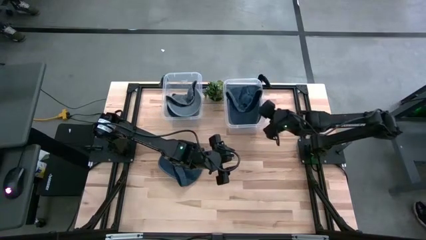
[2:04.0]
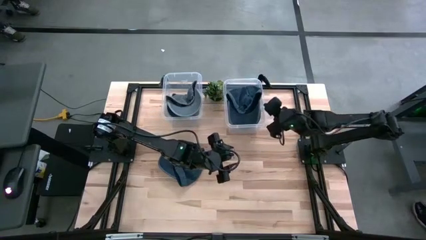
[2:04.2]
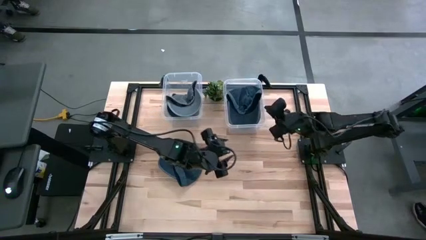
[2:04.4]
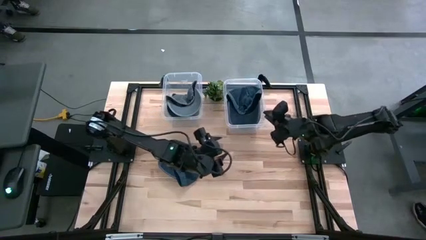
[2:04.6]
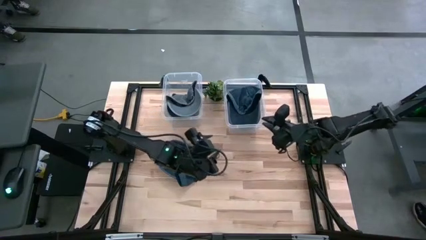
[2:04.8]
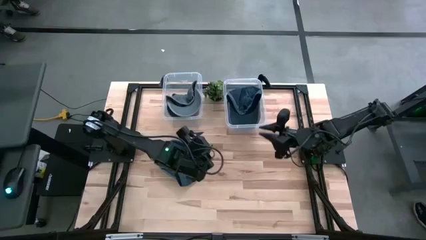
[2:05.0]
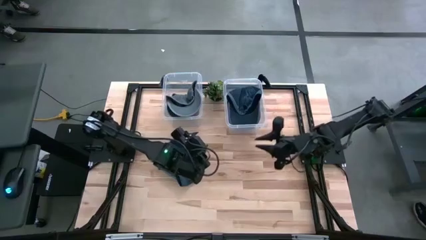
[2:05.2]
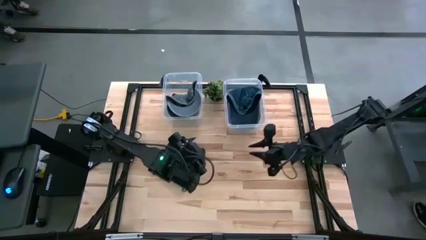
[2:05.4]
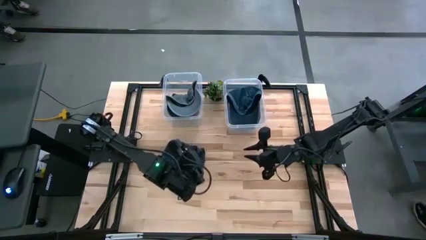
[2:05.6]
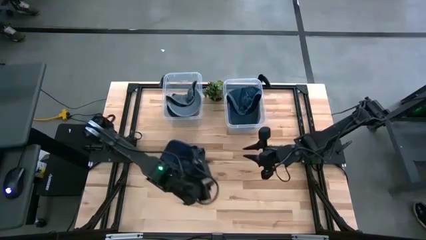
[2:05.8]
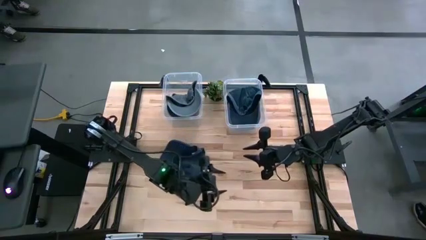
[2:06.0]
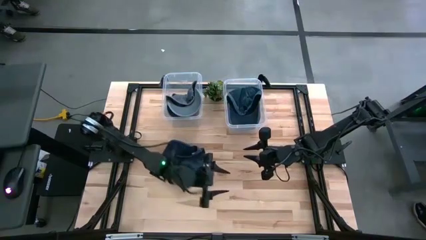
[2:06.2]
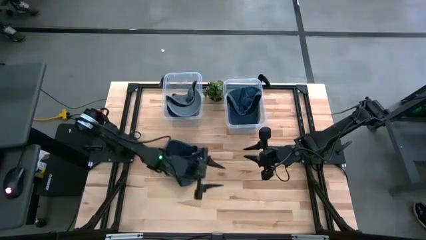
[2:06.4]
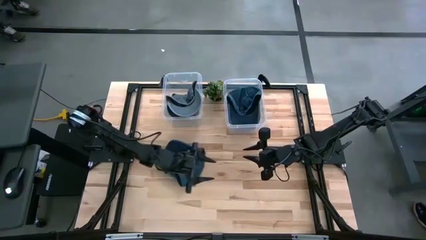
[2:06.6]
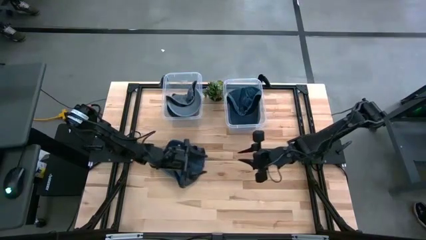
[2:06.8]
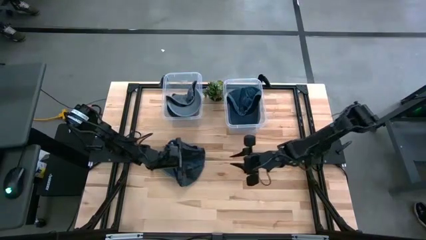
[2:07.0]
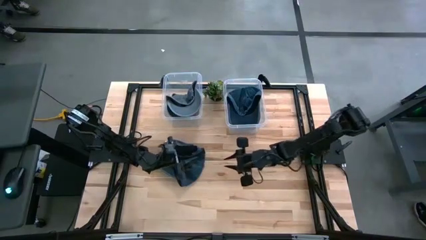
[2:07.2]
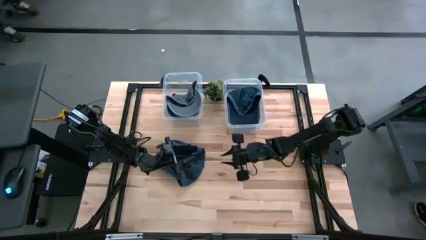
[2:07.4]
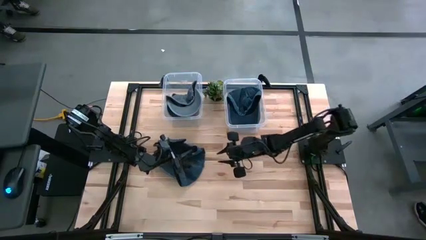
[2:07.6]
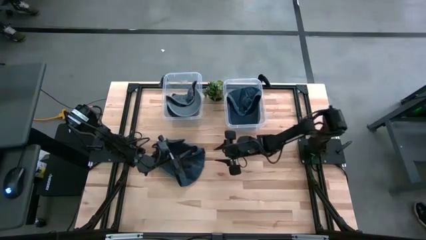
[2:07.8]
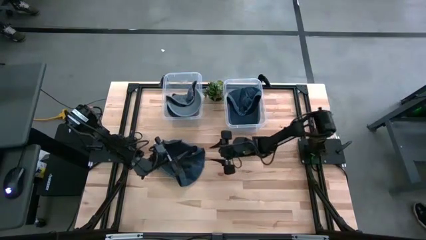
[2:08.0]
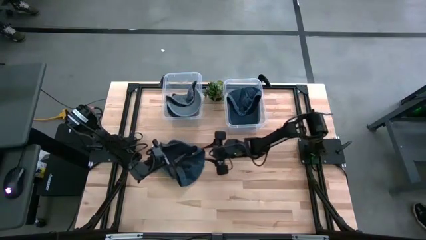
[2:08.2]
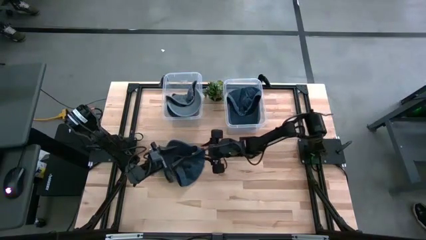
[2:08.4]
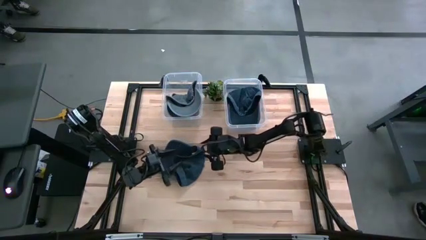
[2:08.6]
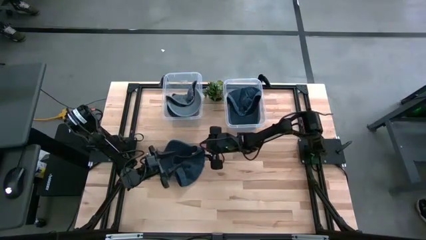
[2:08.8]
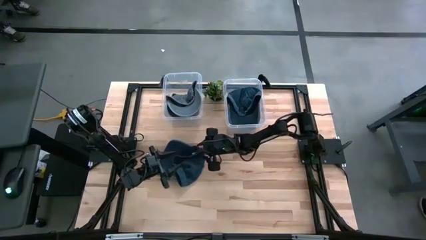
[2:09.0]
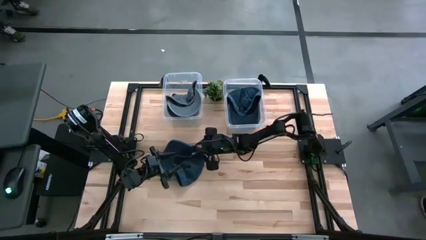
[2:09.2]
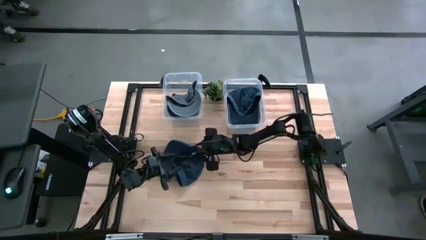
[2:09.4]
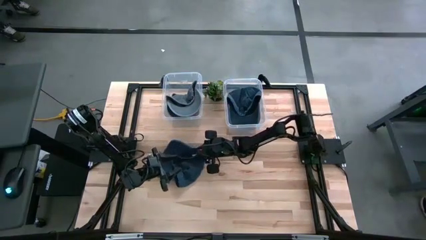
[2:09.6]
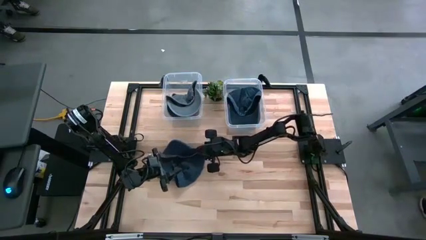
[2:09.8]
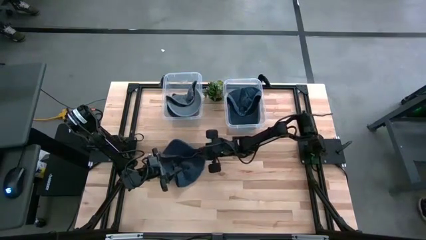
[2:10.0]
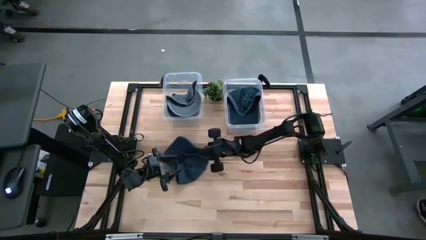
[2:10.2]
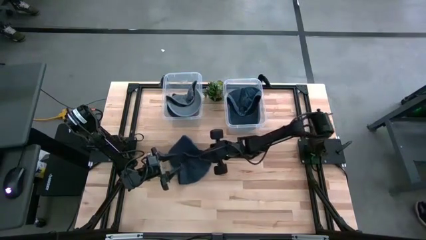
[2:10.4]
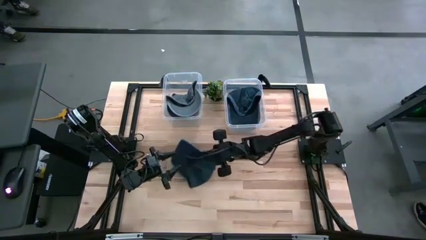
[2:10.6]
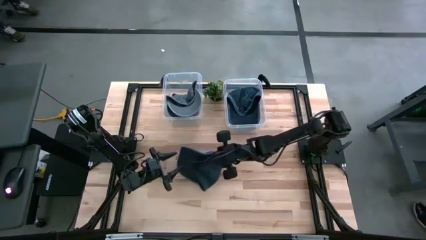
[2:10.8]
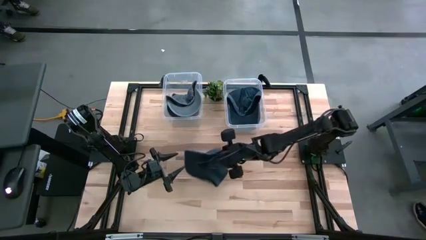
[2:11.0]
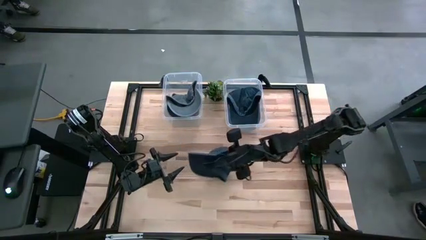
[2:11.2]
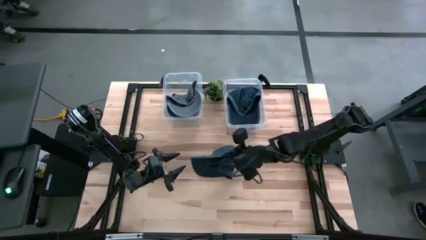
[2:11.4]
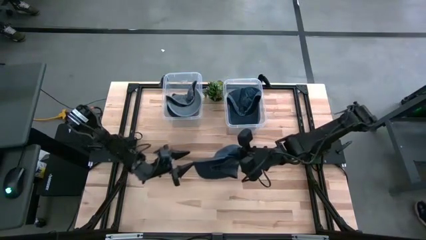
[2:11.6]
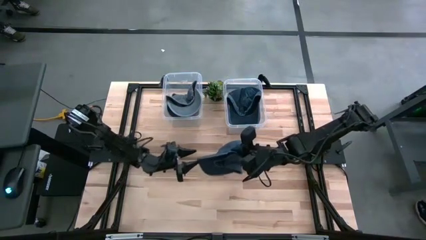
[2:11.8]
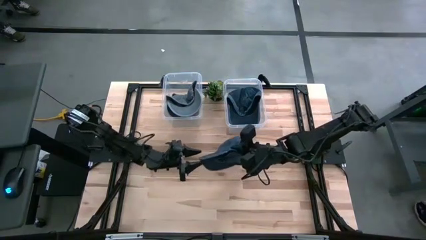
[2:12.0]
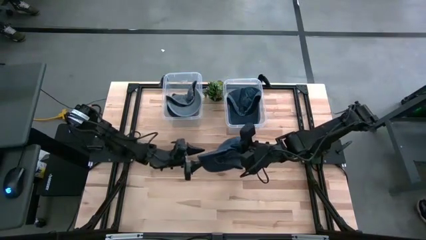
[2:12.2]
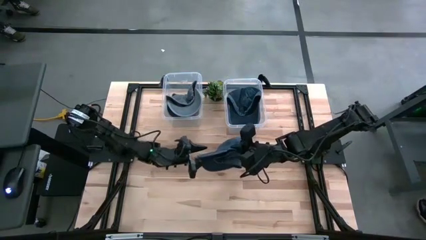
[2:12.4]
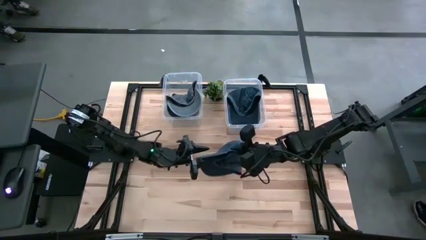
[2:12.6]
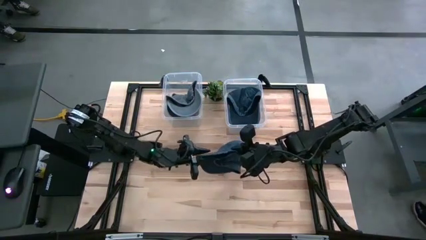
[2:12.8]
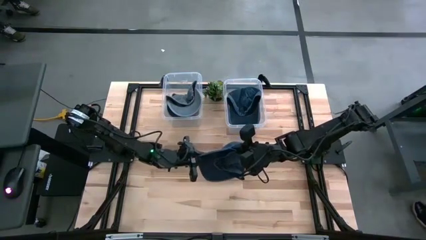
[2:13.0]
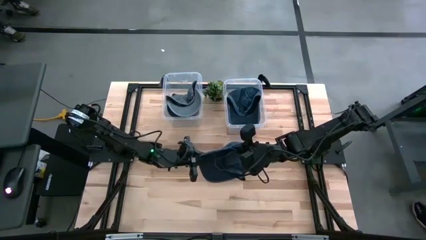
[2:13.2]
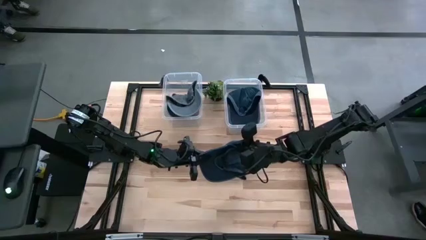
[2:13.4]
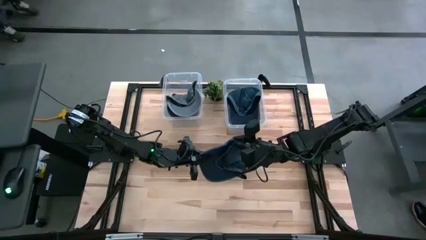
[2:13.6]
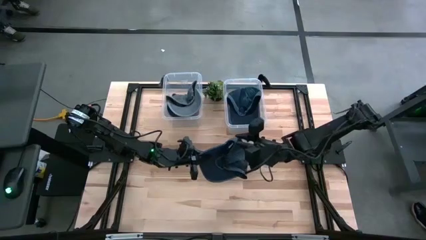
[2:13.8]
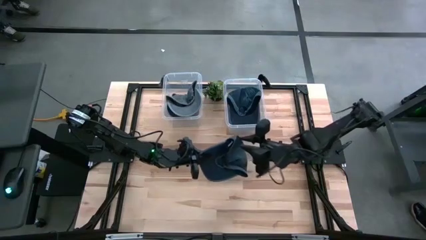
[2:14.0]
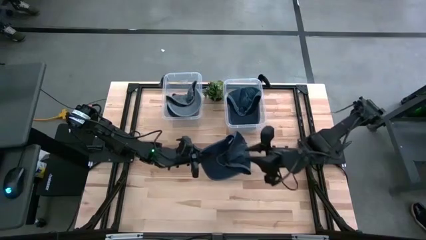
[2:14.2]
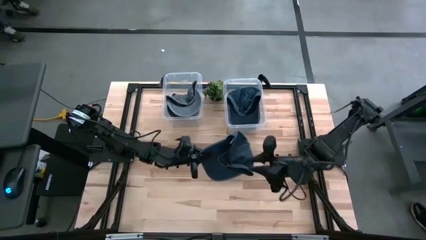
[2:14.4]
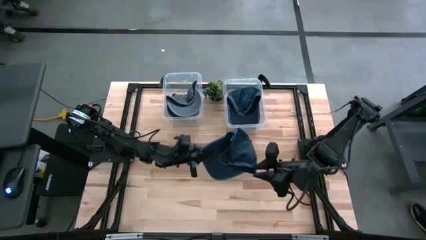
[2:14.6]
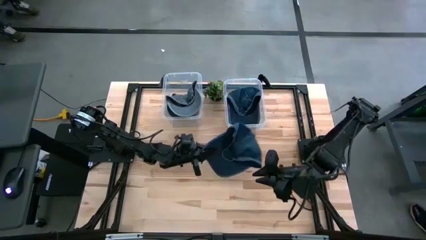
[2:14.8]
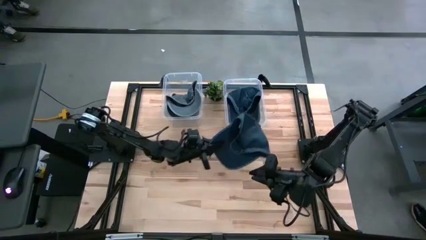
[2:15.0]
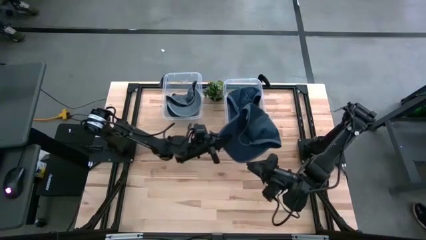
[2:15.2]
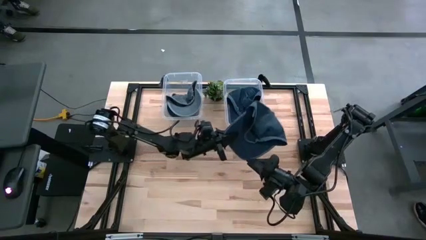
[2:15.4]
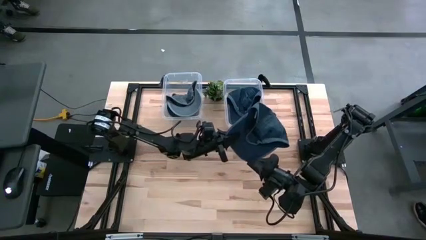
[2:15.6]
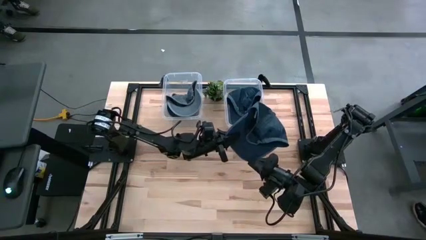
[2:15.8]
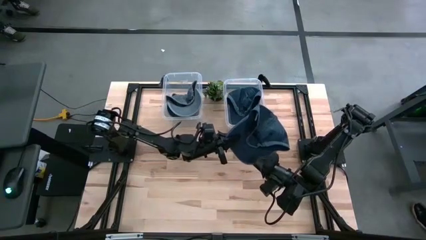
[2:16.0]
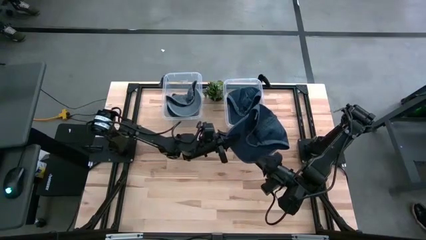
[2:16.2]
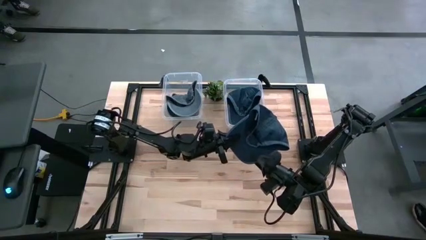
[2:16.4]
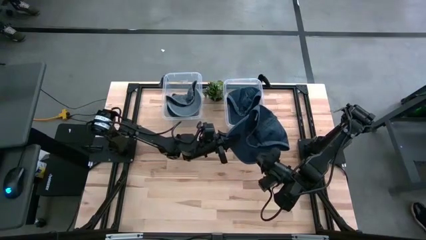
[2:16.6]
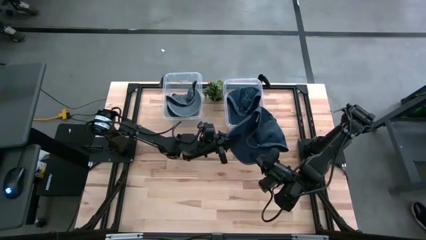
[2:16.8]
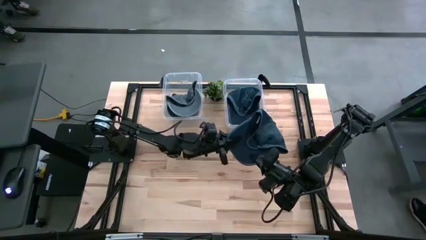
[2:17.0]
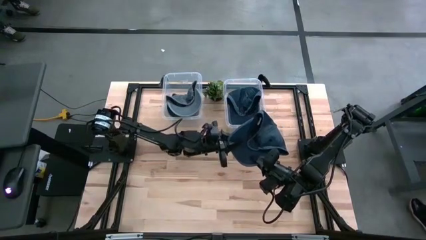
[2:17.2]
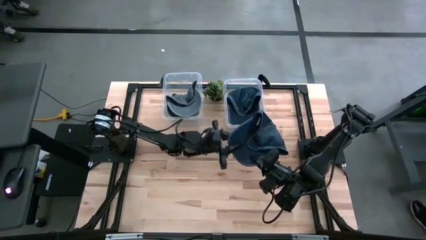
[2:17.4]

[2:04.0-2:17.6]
Task: Pick & Place hat
Put the blue cap into the right transparent bin

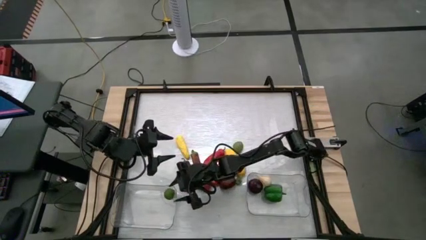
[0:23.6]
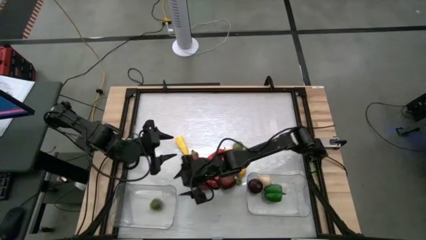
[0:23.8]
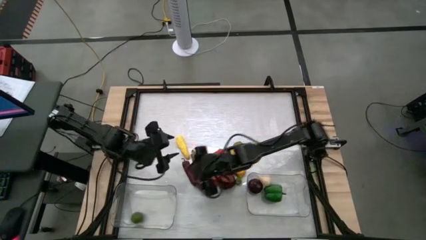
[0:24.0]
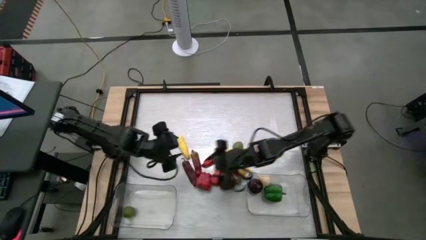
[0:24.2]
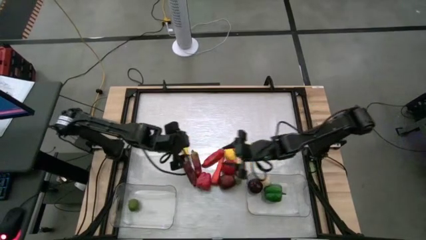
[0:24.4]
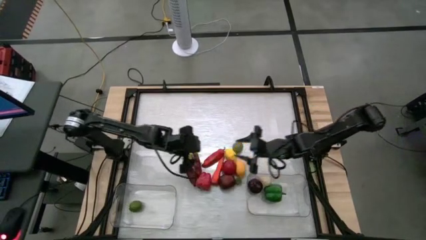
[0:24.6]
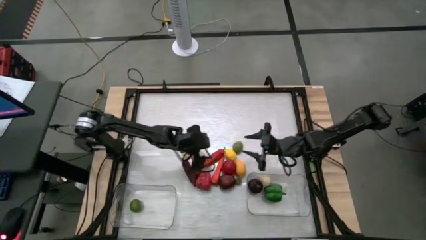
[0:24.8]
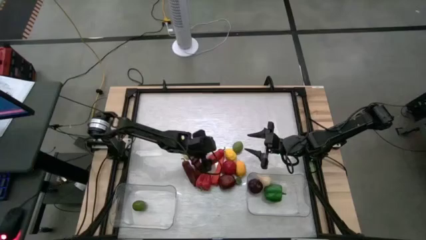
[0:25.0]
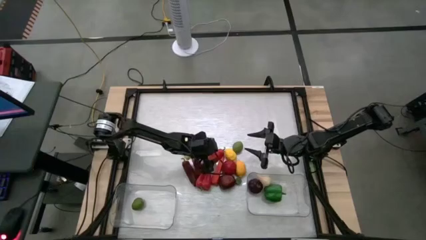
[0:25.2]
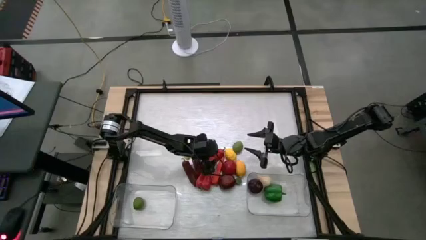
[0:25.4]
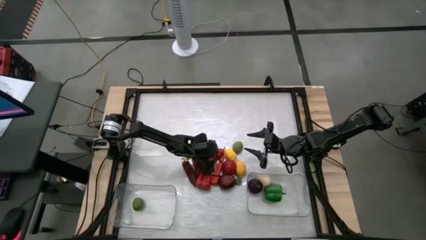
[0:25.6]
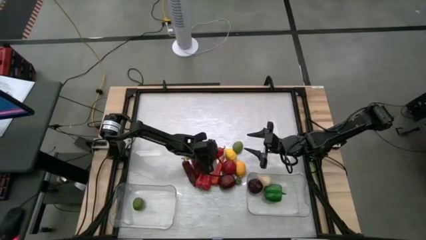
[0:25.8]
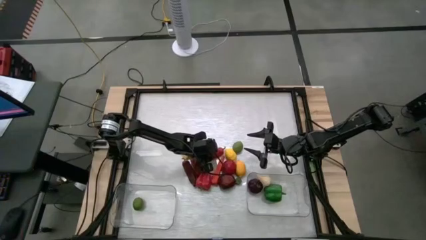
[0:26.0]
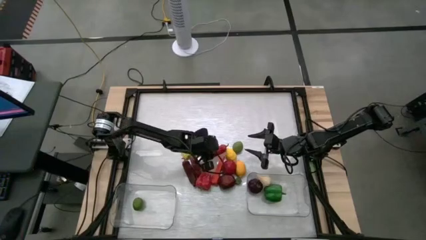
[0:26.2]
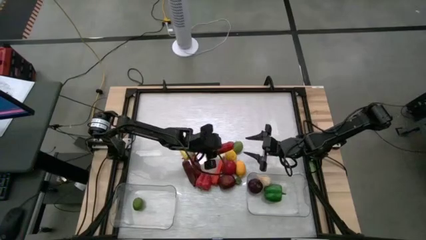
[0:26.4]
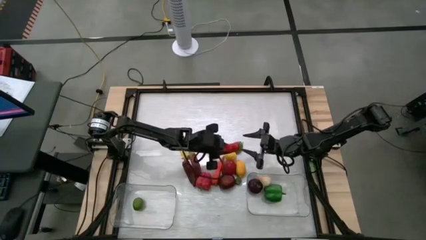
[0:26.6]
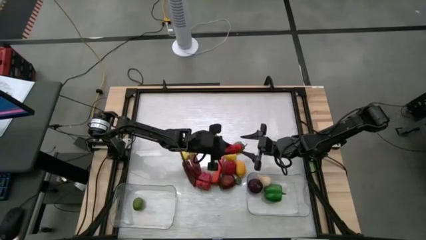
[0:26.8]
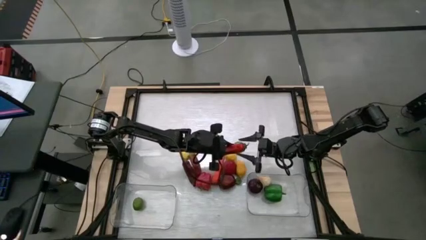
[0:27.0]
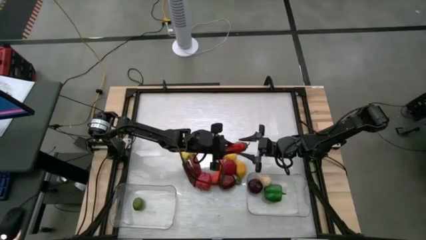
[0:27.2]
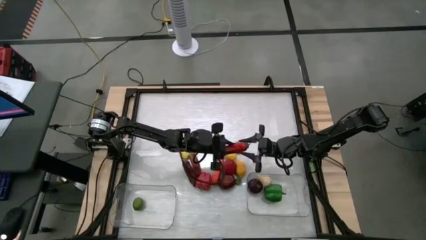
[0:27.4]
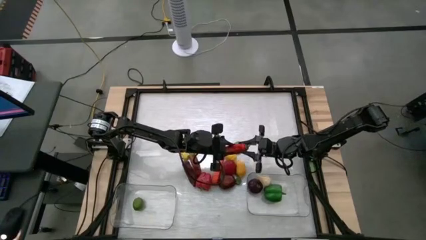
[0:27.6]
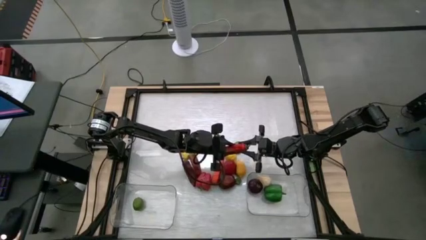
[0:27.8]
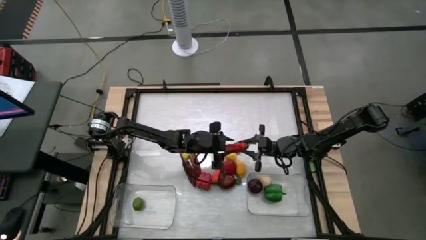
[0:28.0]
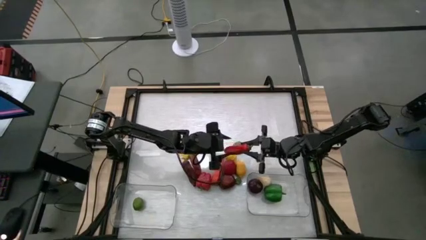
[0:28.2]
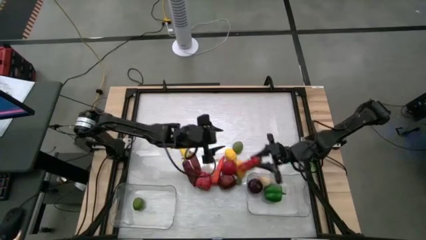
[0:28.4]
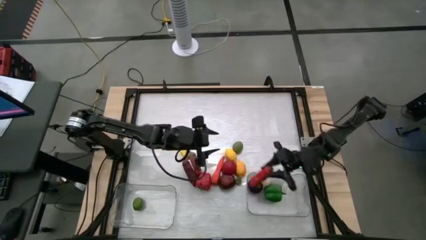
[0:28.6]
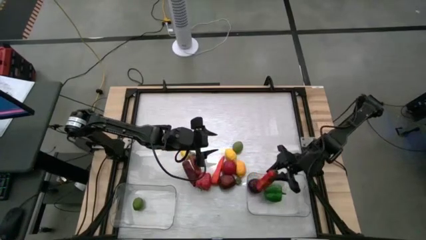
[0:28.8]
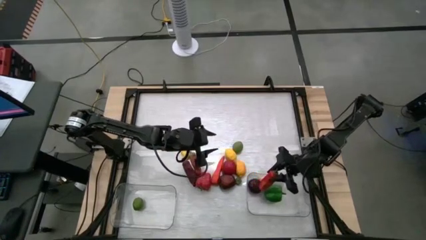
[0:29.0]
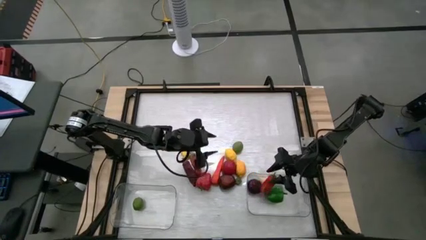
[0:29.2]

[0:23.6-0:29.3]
Task: Sort produce into baskets
Put the red pepper into the right transparent bin
